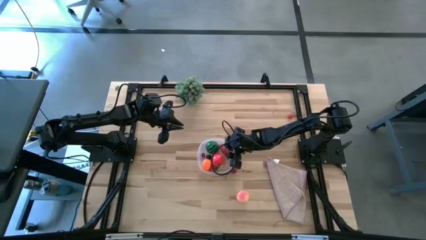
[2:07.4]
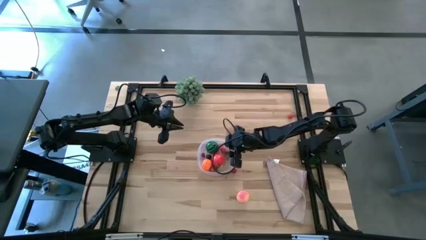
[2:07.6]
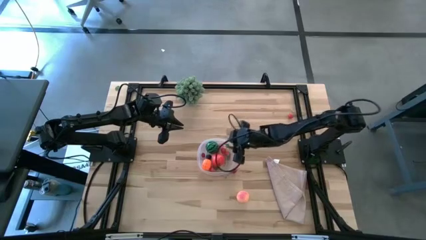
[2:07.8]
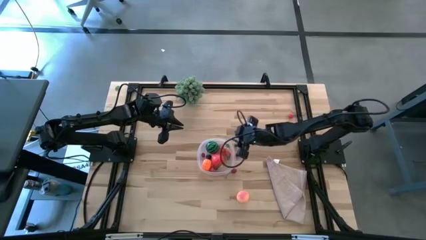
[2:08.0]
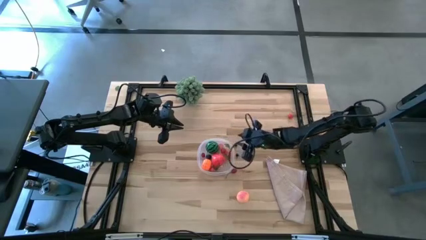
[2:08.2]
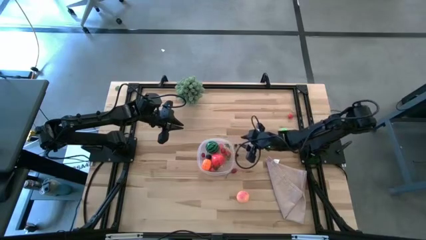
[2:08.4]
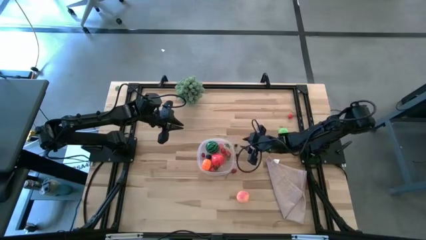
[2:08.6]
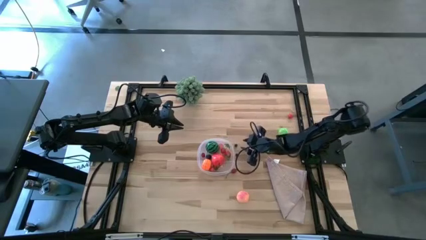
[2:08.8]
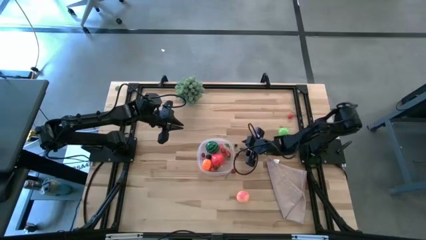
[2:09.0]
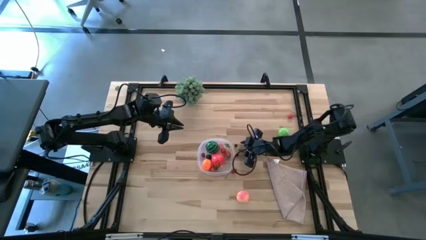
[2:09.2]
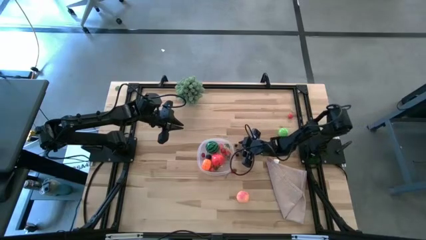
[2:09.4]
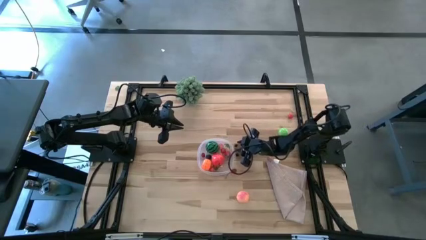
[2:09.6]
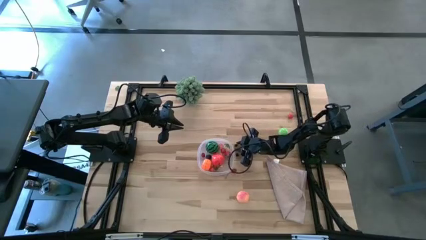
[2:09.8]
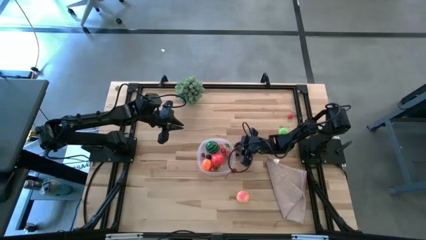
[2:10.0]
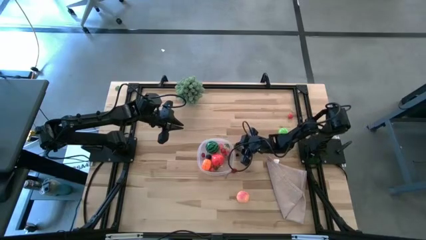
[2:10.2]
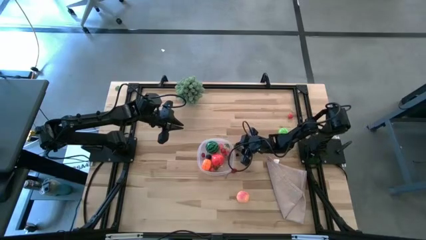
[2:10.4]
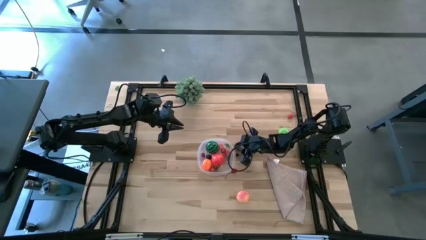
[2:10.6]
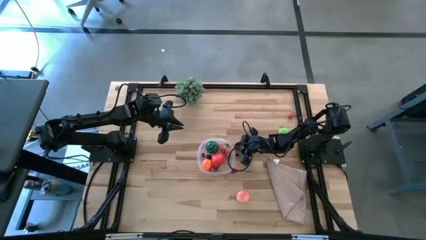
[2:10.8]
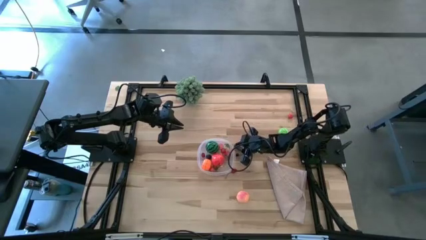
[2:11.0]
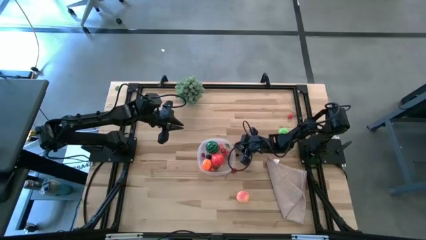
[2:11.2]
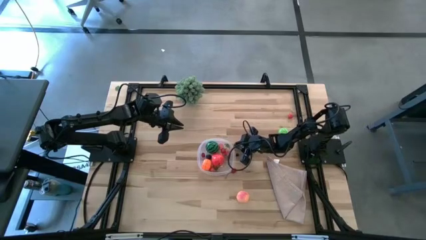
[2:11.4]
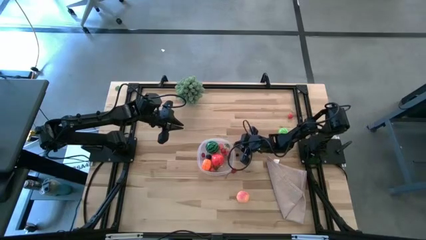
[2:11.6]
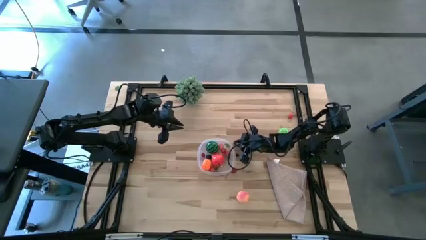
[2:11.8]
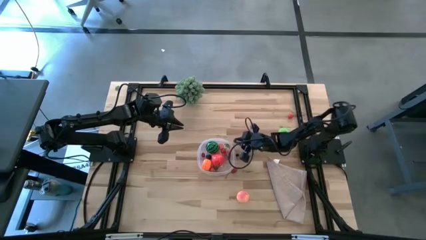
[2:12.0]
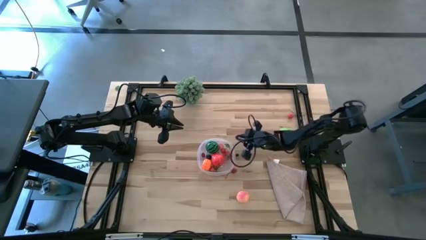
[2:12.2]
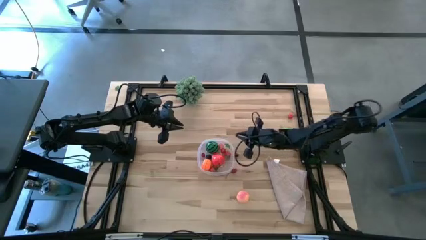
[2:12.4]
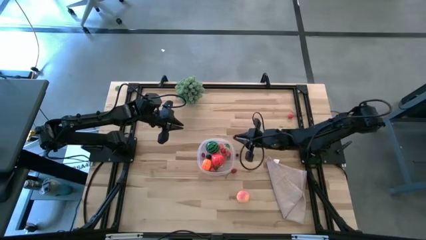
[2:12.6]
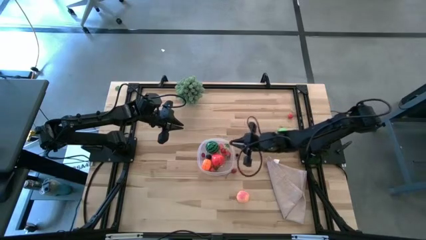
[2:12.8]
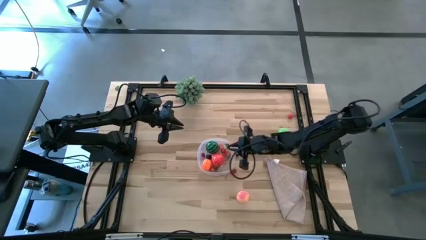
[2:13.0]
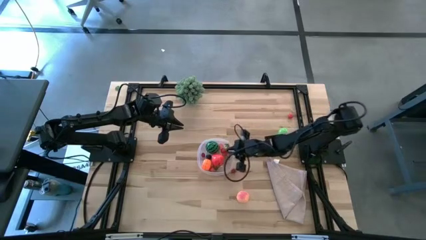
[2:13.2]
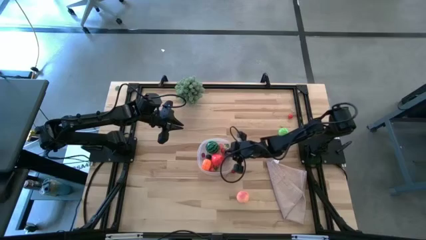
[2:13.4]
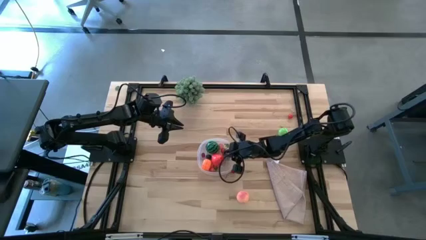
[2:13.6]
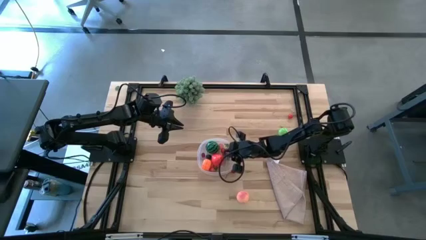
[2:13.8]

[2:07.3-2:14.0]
Task: Pick and placing Produce into tupperware
Put the top blueberry into the transparent container

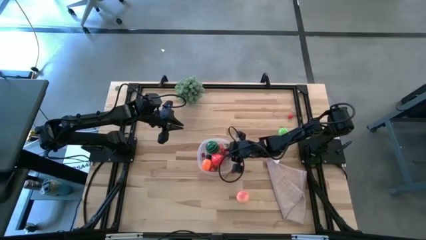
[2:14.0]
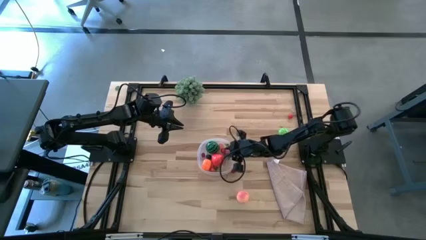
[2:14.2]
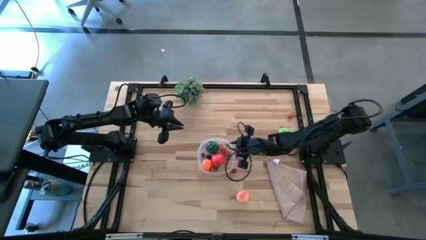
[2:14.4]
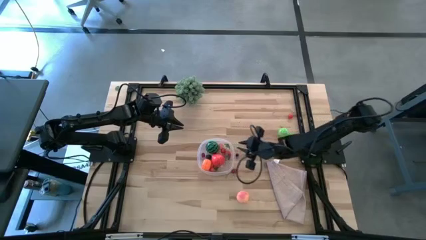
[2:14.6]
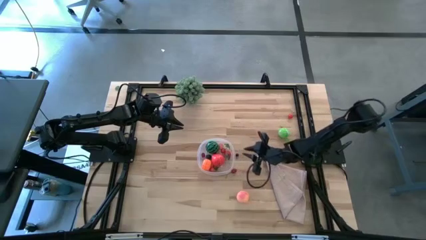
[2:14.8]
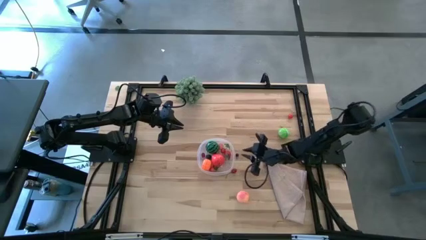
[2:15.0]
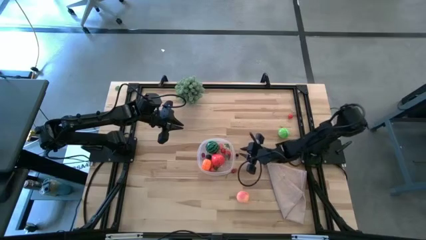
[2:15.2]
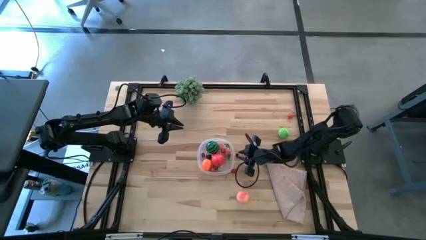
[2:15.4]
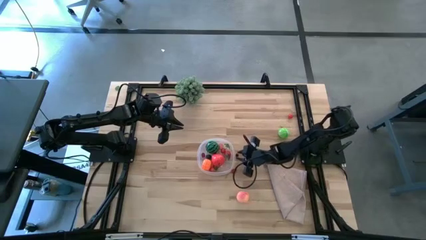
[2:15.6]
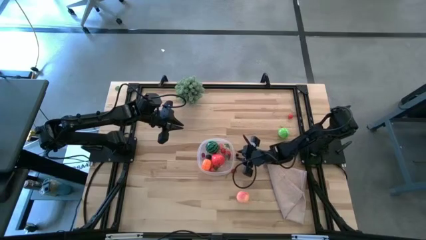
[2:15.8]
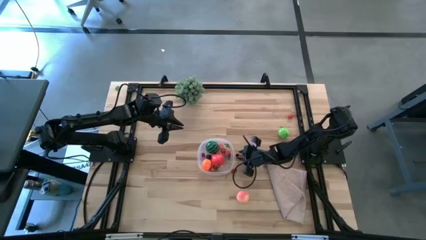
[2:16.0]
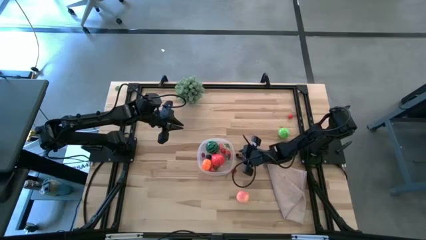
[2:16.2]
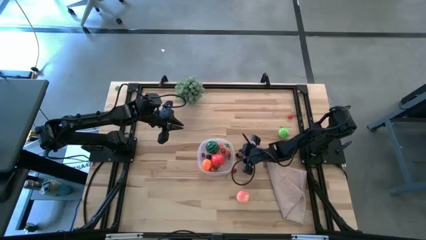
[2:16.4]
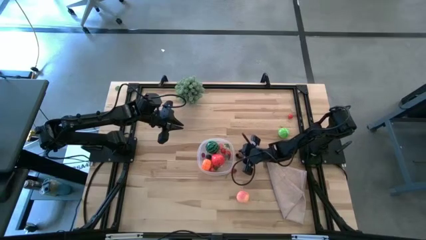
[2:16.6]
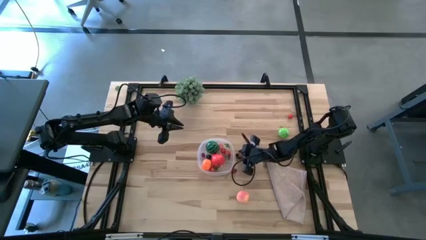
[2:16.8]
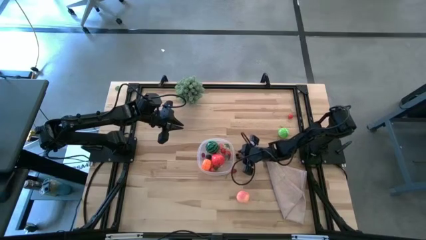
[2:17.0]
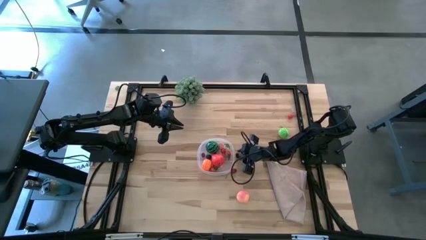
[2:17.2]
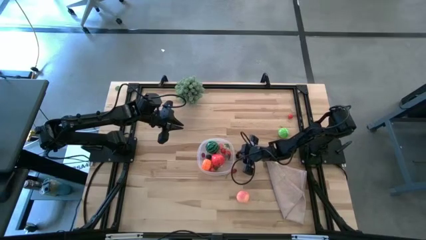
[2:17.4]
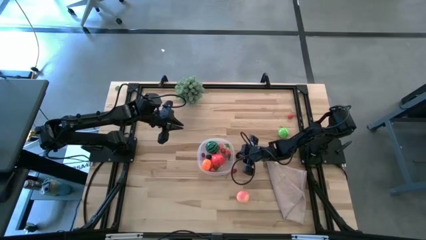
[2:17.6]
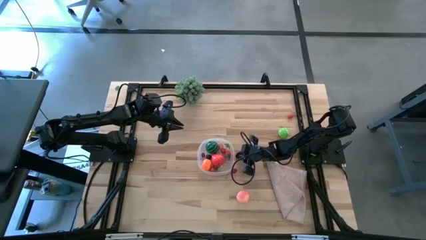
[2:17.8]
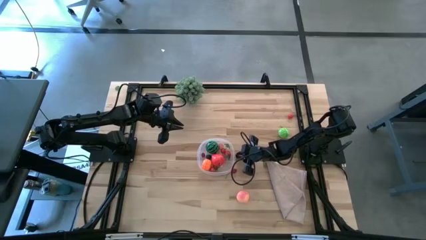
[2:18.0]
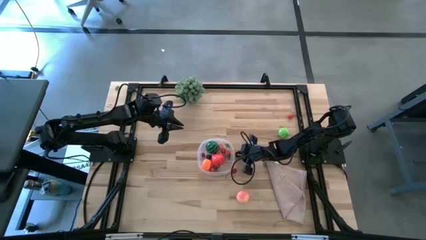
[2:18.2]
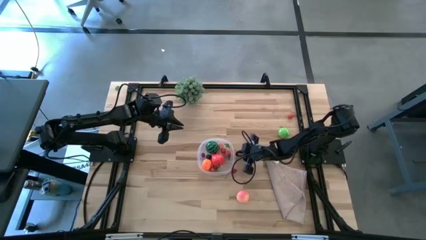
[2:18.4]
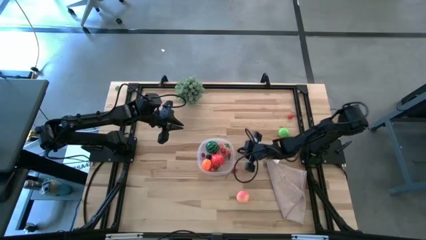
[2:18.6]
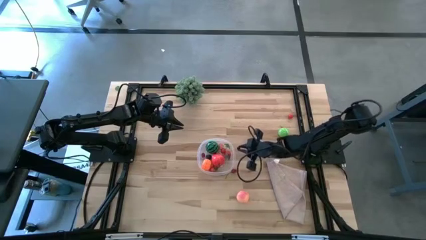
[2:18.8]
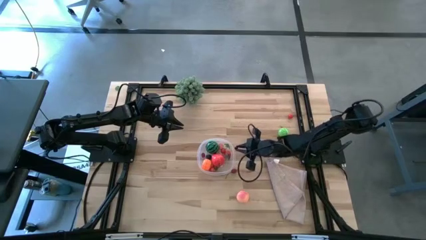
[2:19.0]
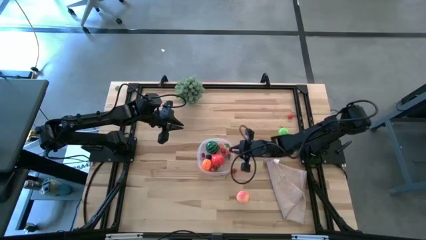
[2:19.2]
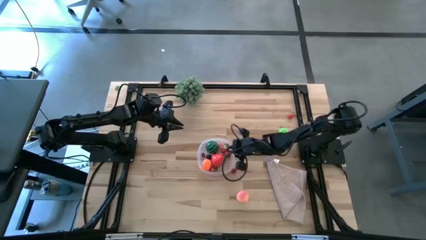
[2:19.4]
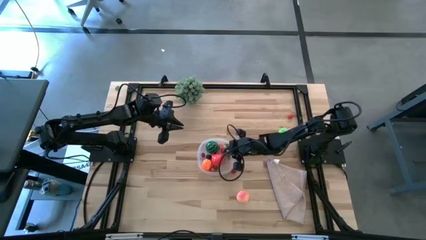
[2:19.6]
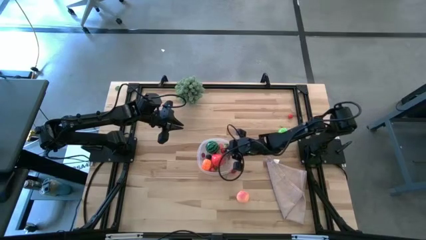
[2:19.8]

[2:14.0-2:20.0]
Put the blueberry into the transparent container

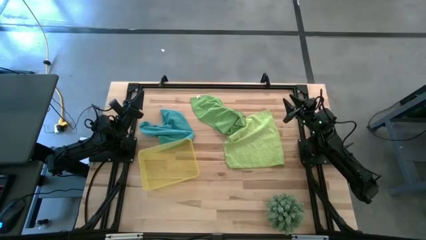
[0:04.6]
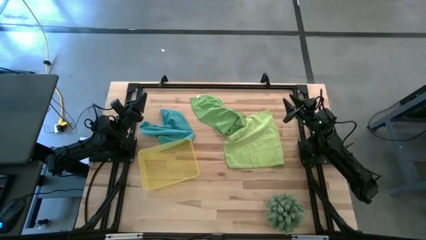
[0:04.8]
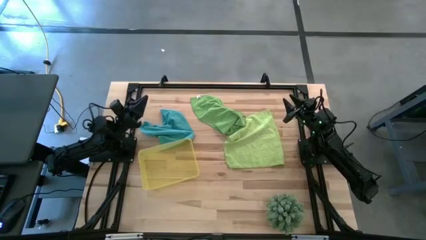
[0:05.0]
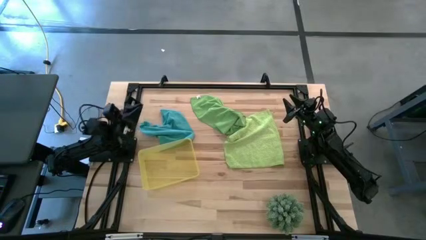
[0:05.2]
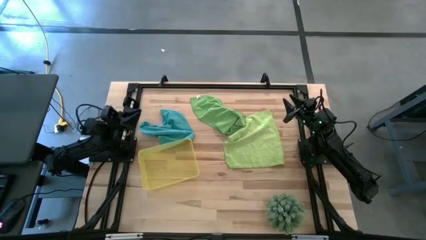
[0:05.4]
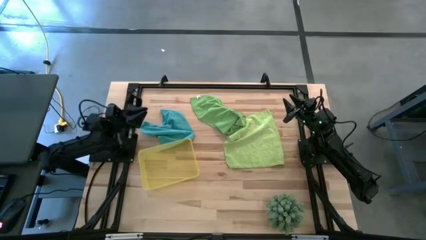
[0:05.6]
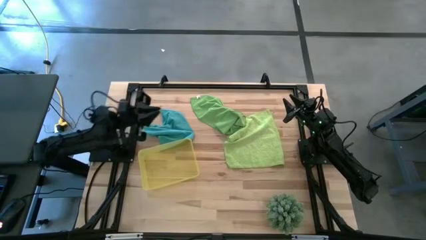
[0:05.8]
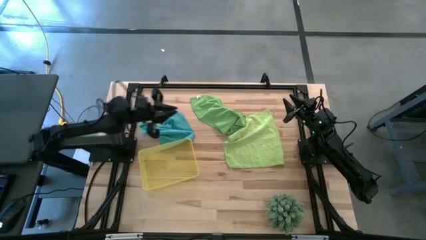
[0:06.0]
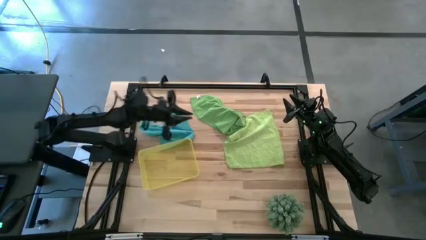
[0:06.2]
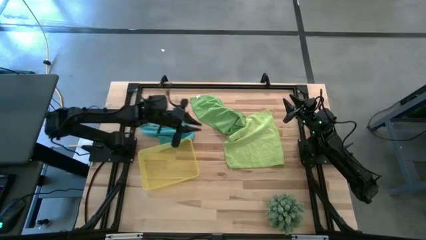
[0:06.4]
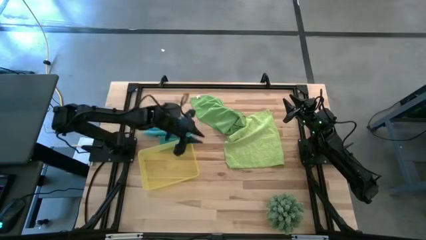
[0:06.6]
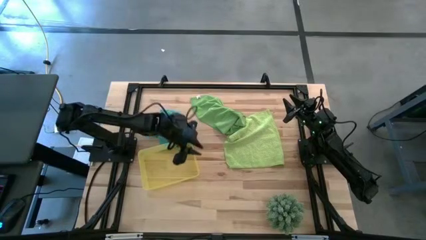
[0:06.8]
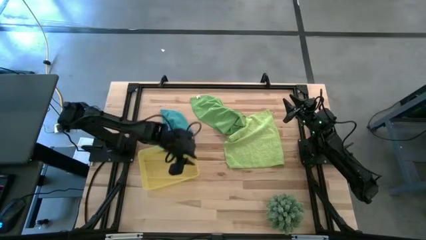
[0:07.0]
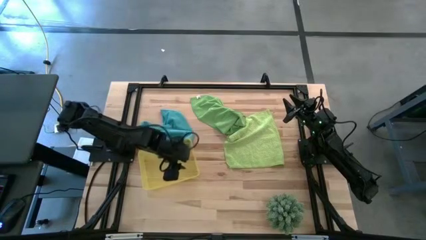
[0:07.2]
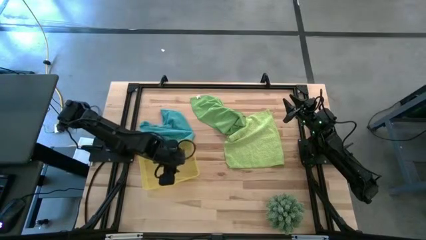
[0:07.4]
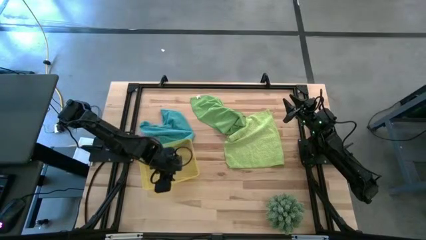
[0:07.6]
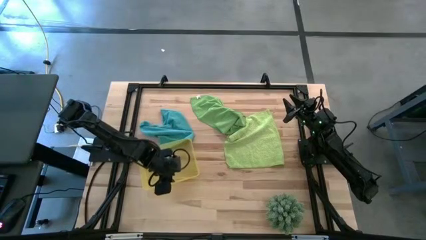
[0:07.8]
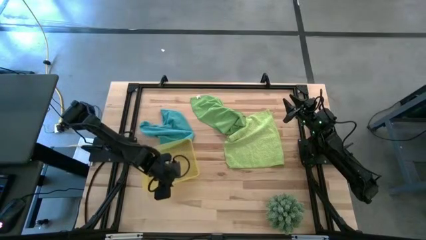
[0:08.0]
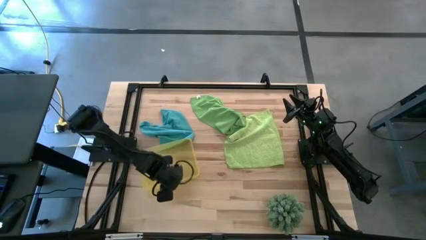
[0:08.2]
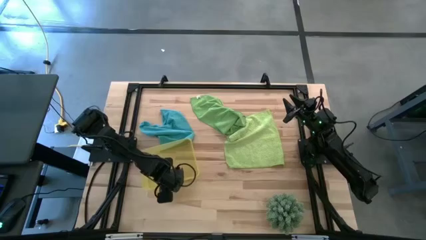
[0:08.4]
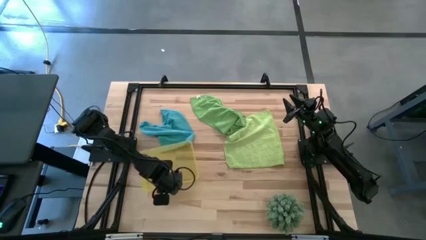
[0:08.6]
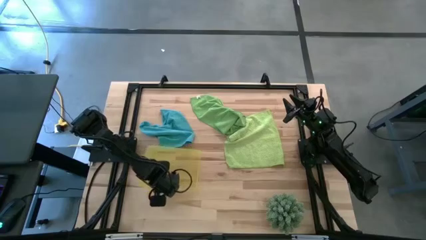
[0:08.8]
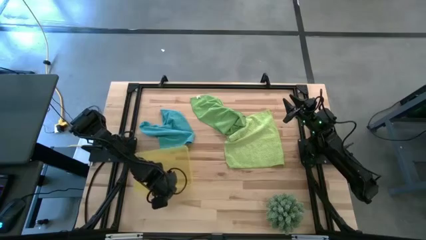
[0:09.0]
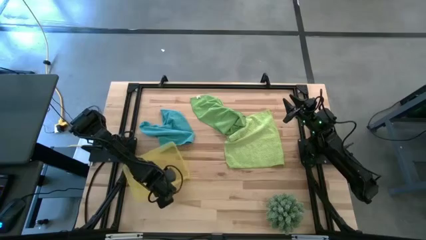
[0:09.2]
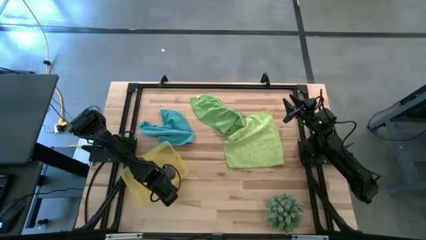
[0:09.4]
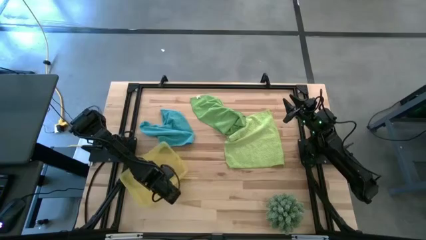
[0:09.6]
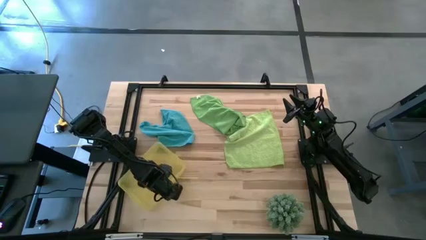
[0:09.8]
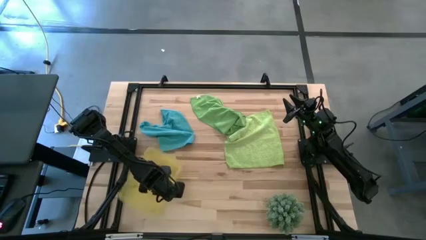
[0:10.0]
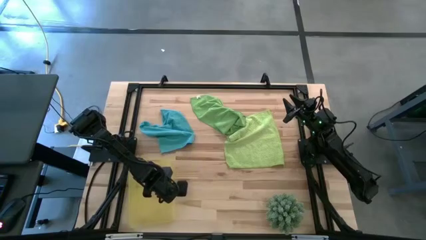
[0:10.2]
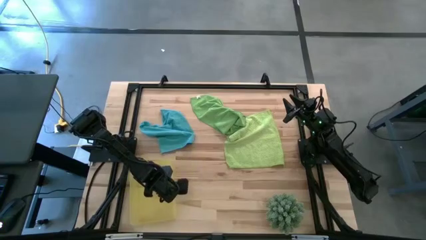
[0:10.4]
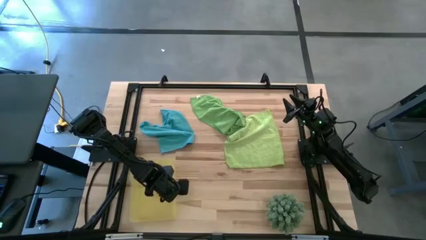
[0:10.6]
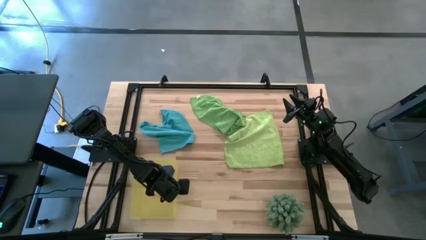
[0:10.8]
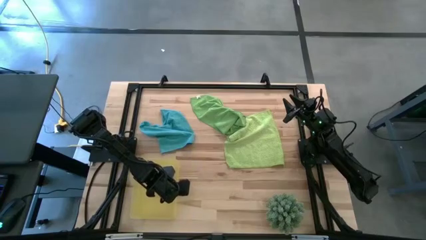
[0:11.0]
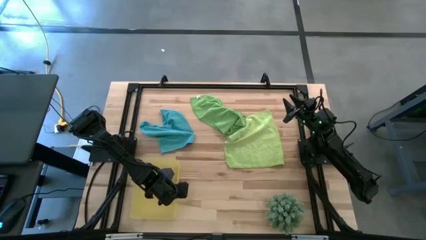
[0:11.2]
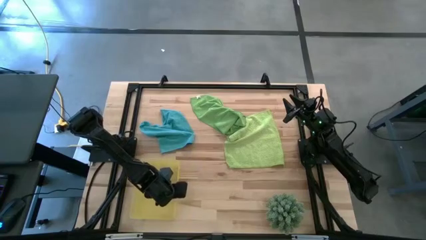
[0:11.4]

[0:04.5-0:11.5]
Task: Roll microfiber towels into tight, uniform cylinder then place into a basket
Prepare the yellow bin on the table
